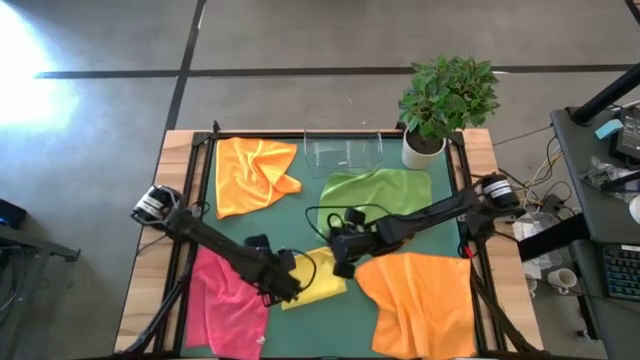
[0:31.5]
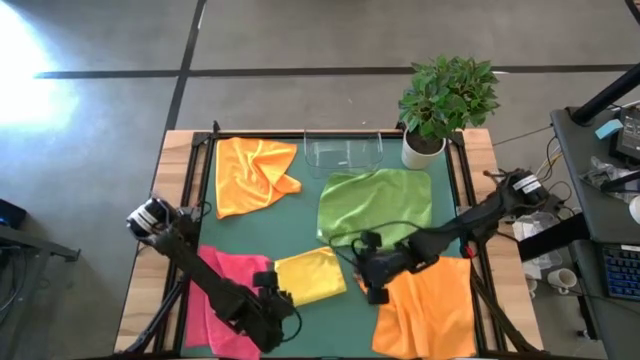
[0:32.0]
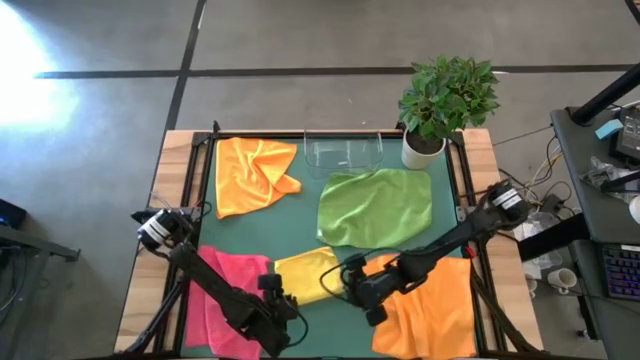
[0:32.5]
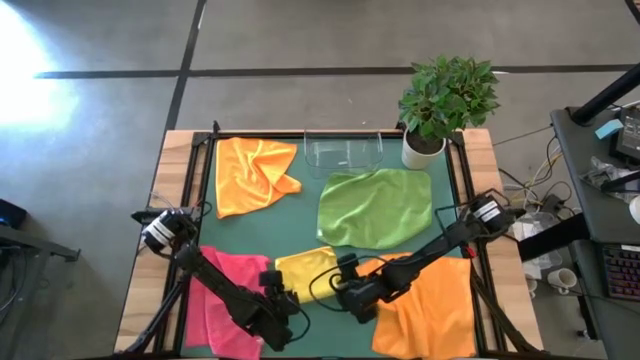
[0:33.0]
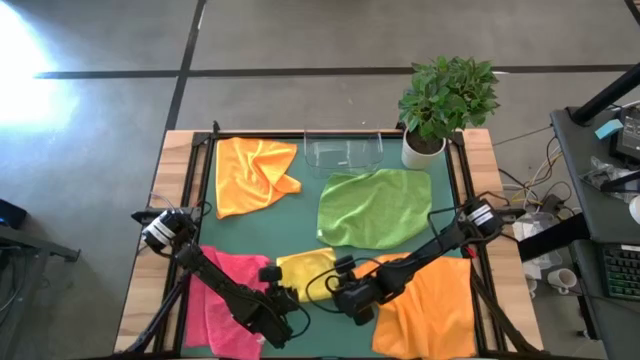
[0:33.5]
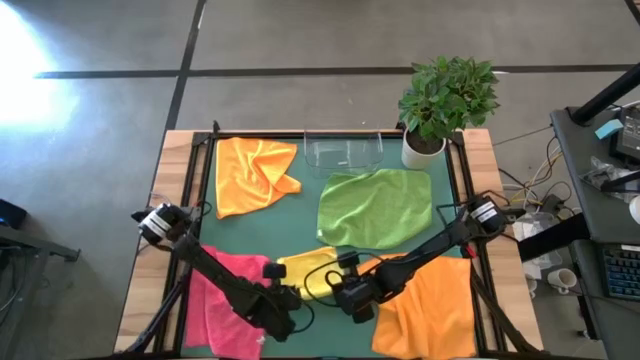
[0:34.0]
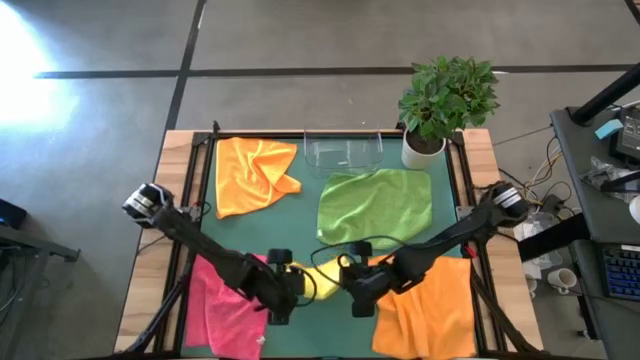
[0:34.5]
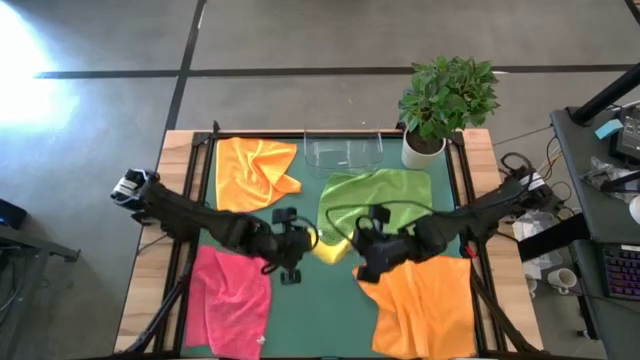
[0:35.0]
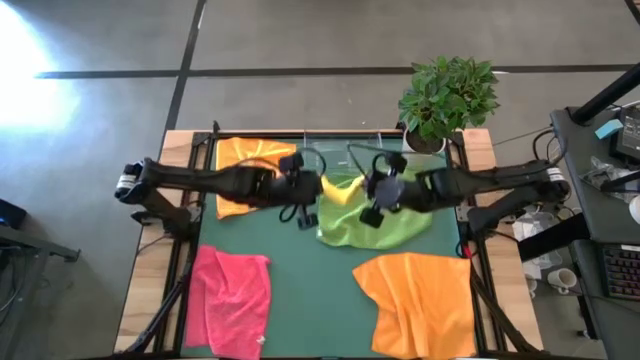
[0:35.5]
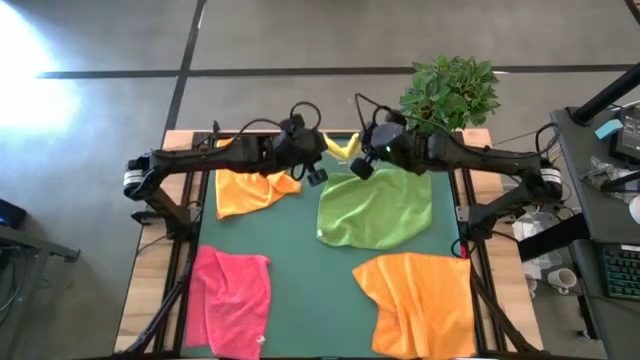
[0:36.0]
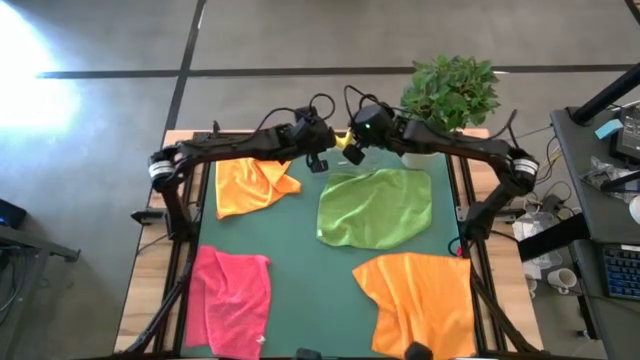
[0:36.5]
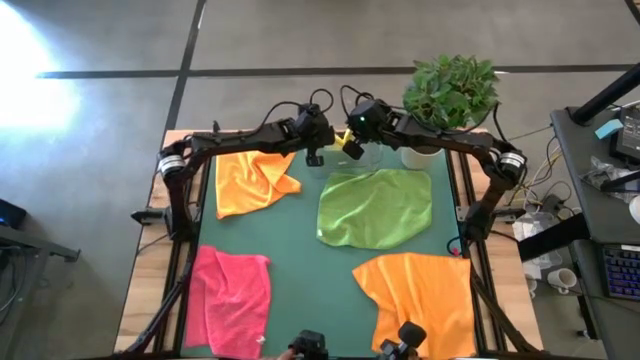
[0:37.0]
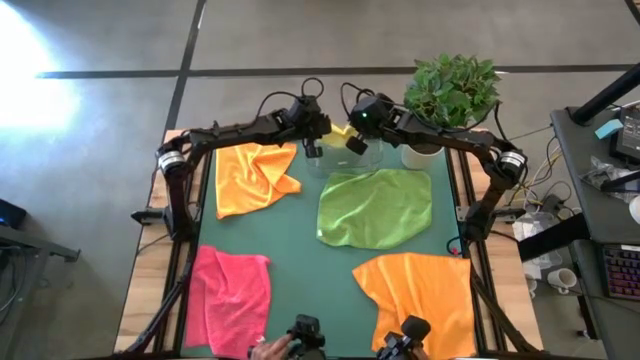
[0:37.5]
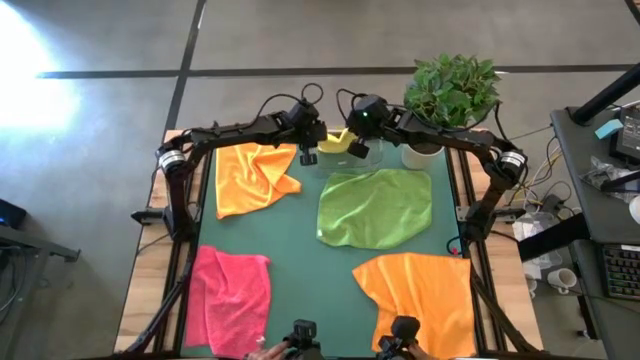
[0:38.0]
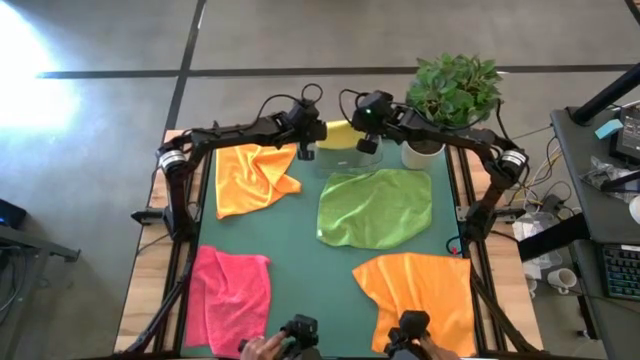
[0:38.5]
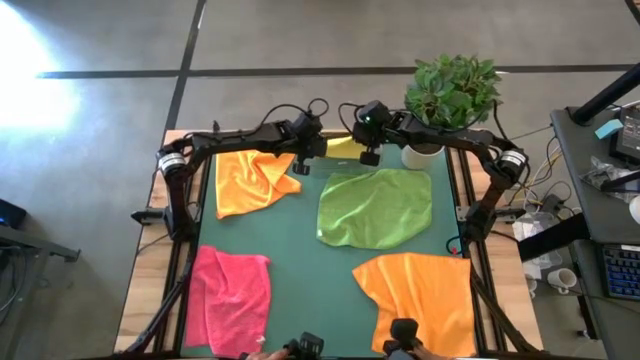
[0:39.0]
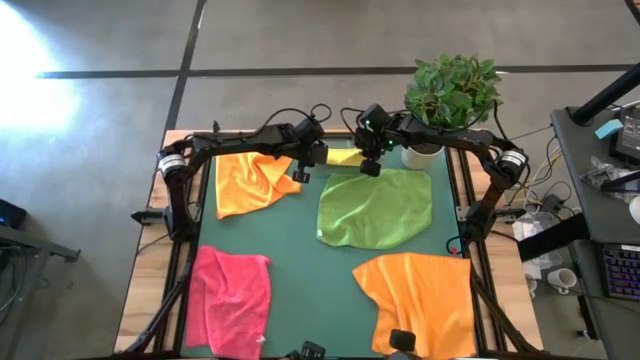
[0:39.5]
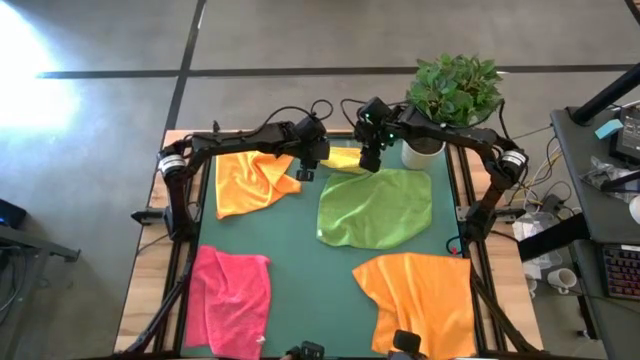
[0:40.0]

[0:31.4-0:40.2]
Task: Fold microfiber towels
Put the folded yellow towel into the transparent bin

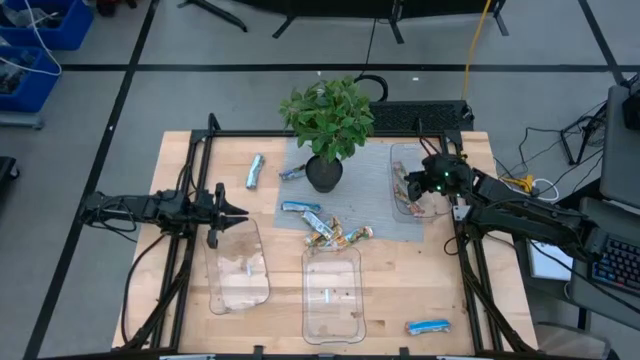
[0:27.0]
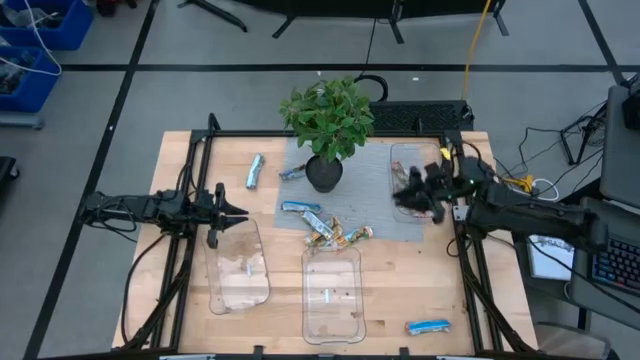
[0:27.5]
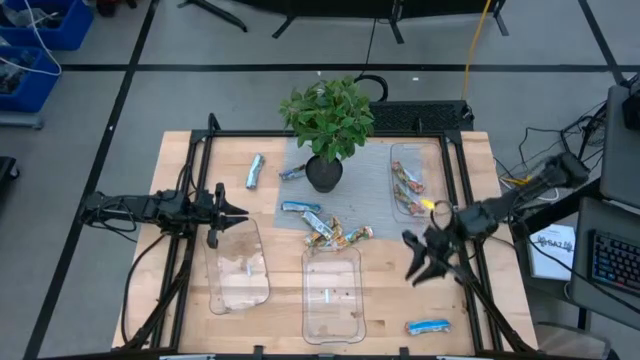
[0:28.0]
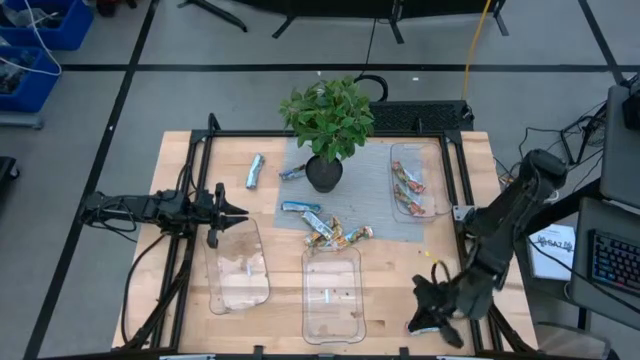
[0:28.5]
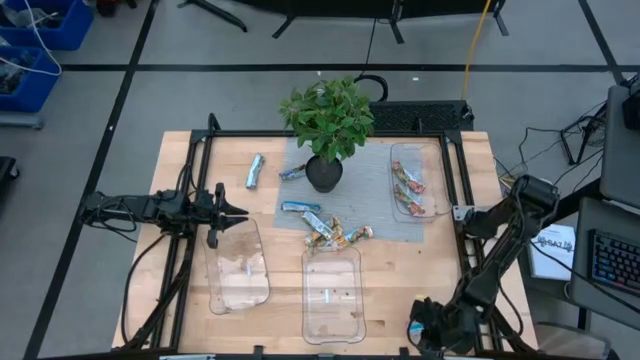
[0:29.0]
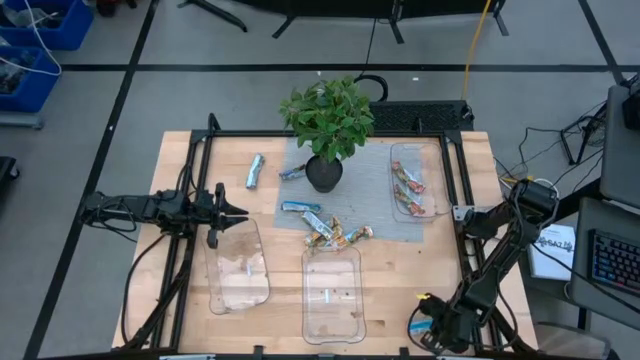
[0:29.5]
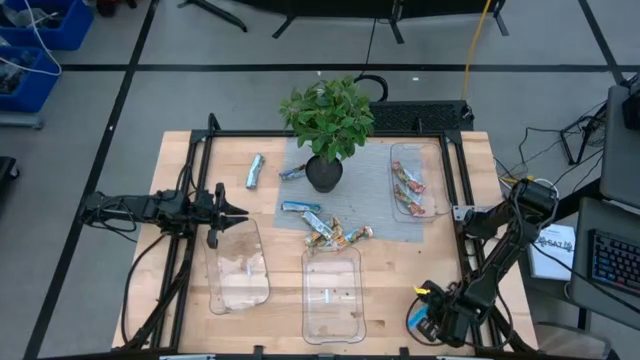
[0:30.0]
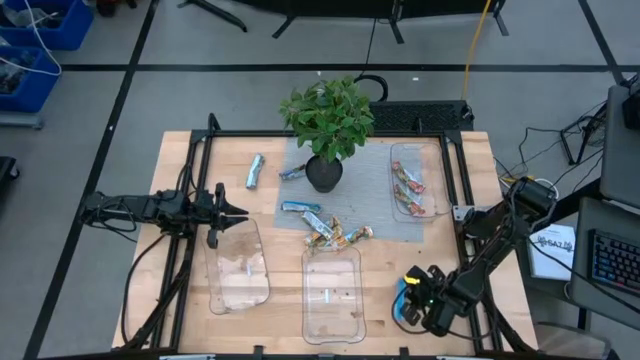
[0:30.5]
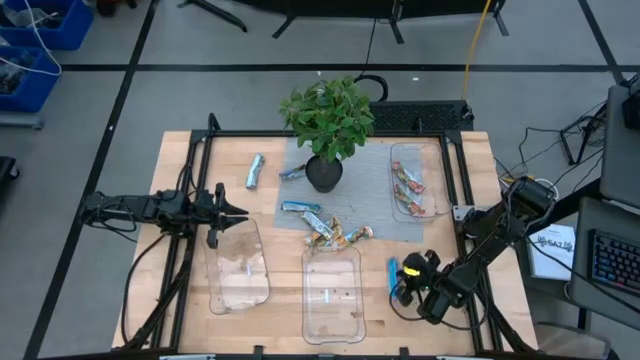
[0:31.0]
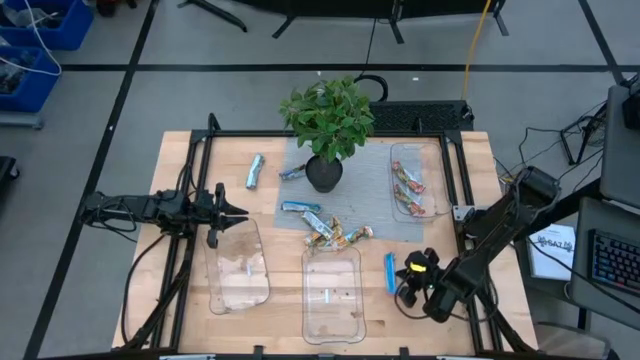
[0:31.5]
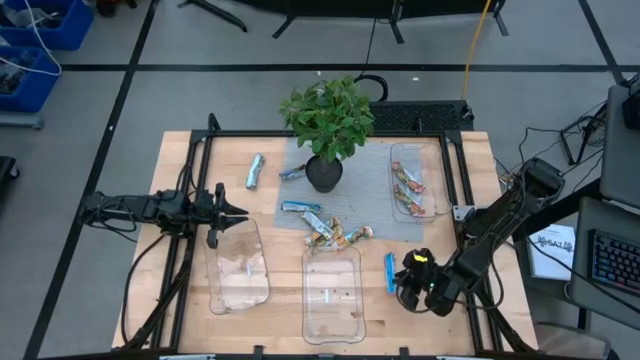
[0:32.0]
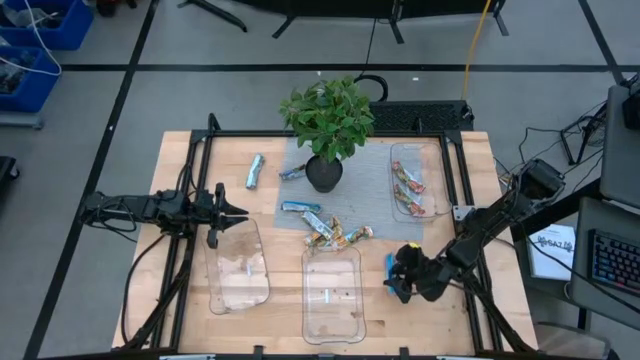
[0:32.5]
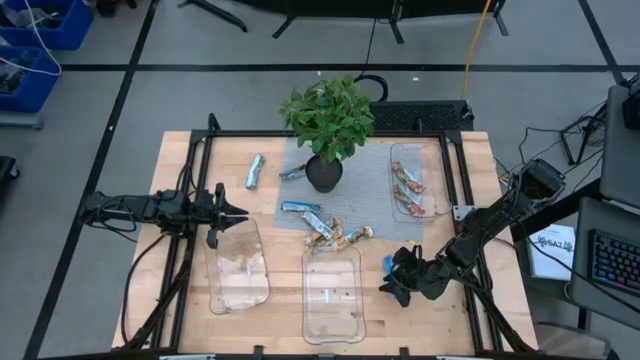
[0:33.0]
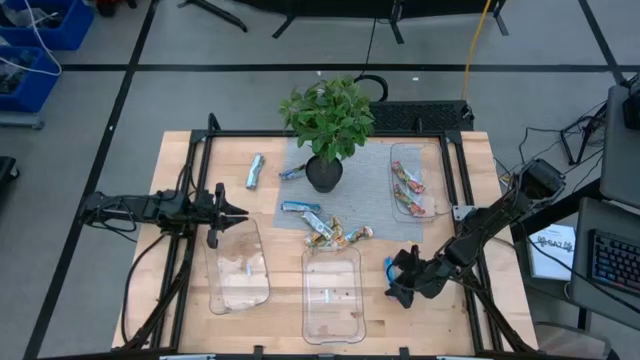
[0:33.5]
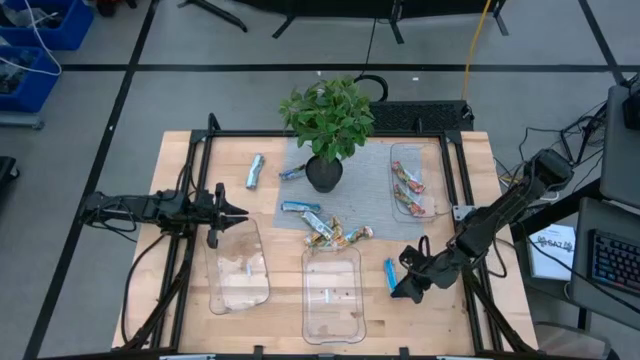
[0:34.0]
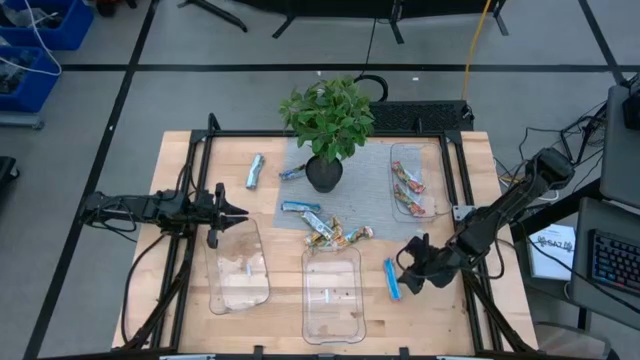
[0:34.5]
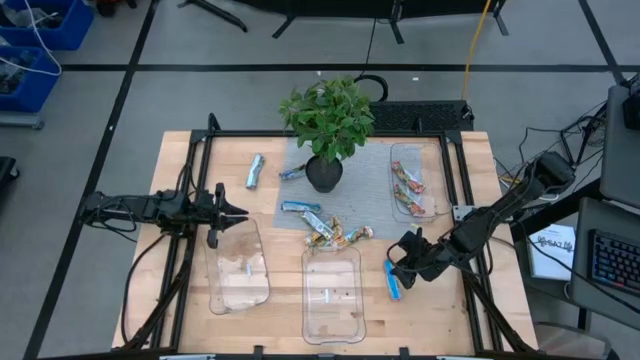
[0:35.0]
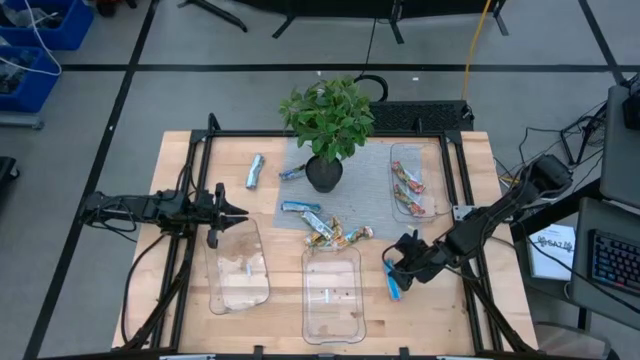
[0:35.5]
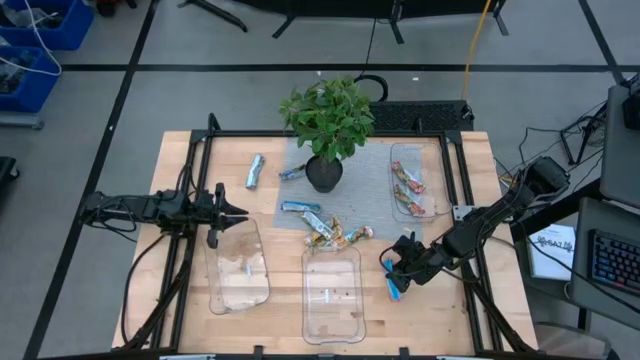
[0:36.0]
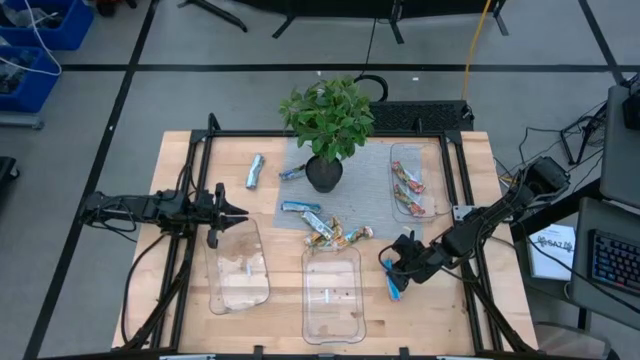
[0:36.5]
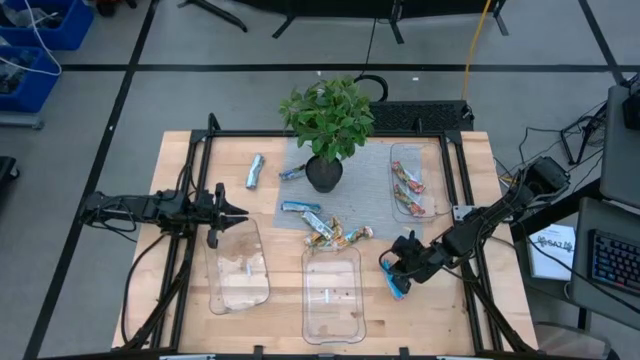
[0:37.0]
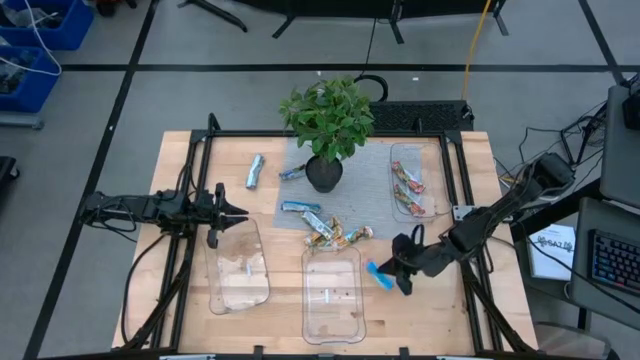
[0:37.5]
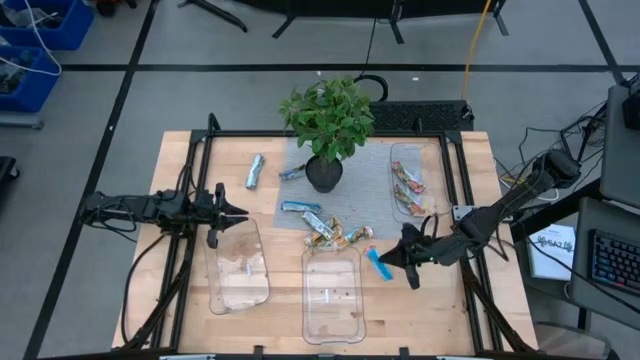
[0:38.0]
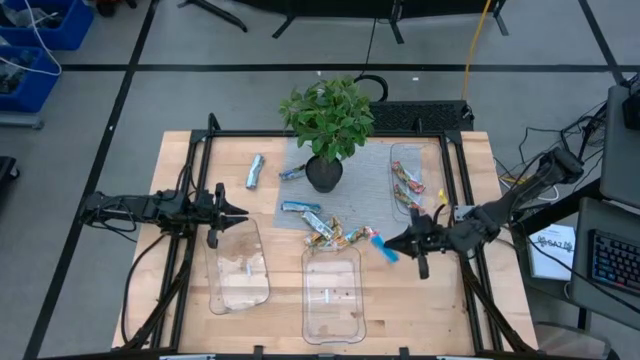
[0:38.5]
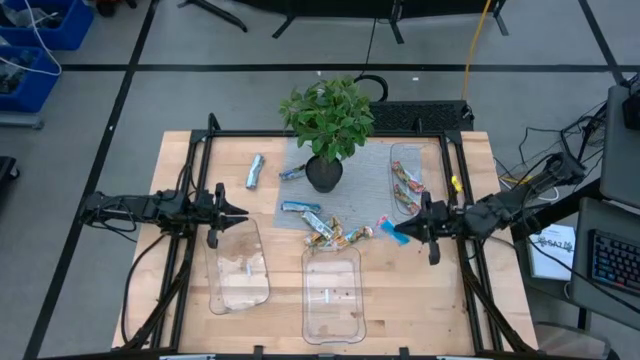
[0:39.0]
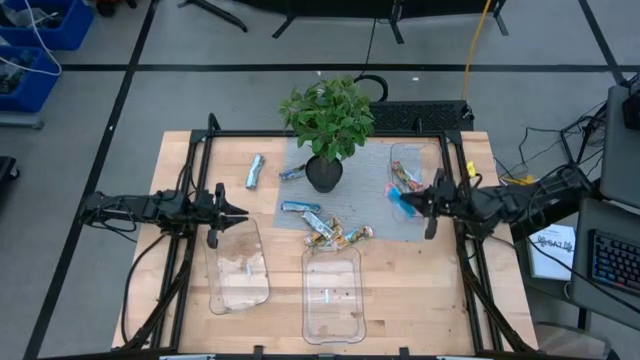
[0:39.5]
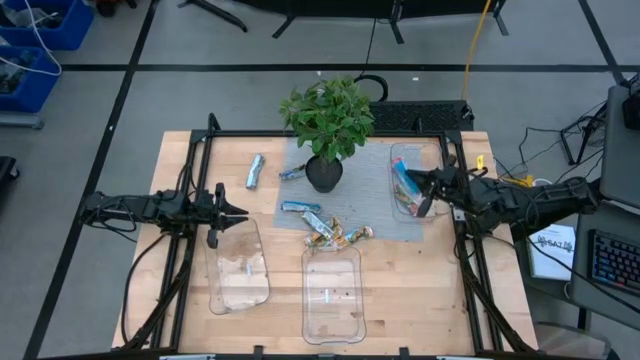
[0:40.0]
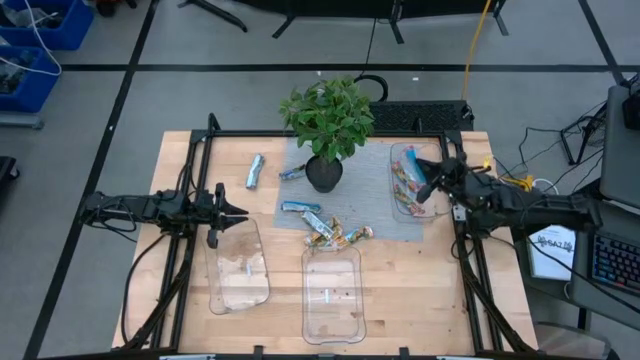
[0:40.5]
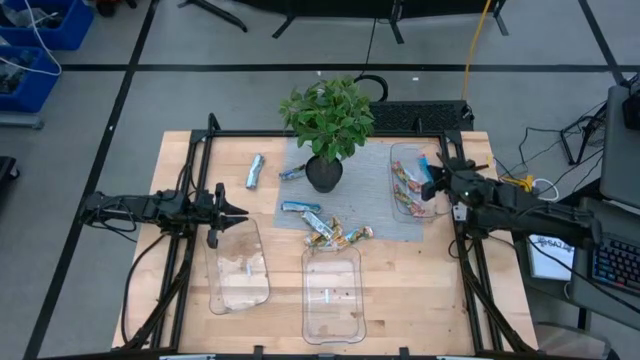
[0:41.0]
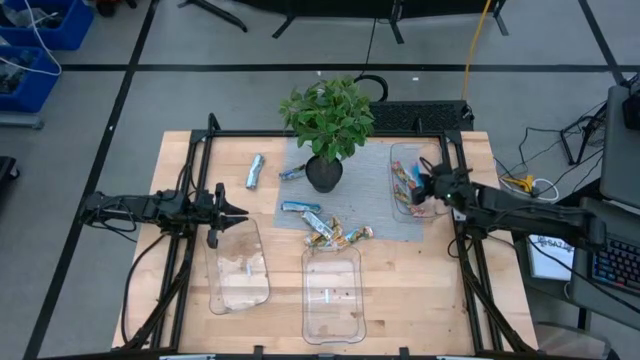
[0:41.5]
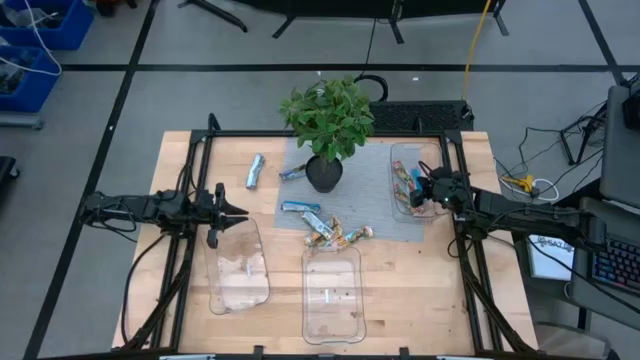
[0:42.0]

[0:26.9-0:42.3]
Task: Pick and place Granola Bars by type
Put the red granola bar into the right transparent bin
